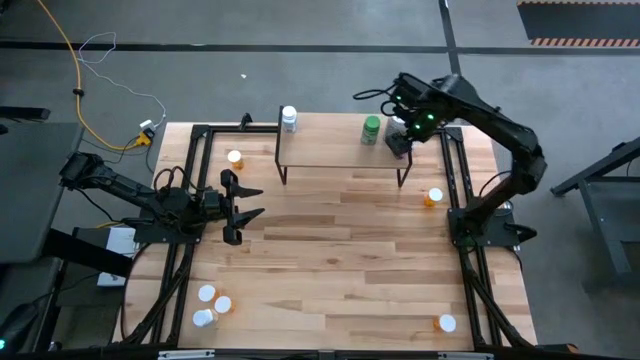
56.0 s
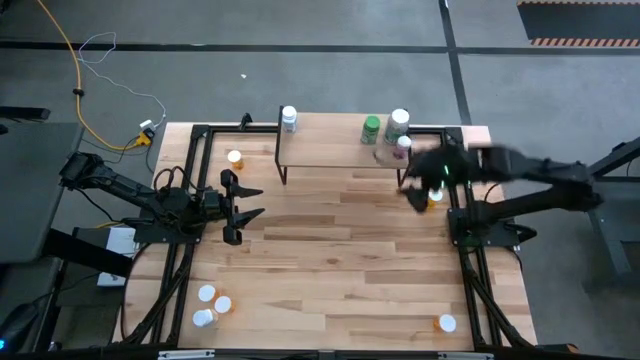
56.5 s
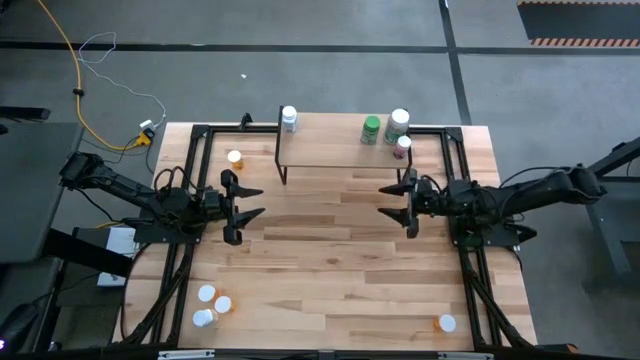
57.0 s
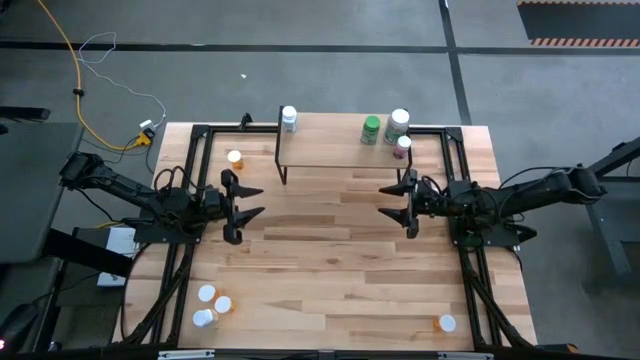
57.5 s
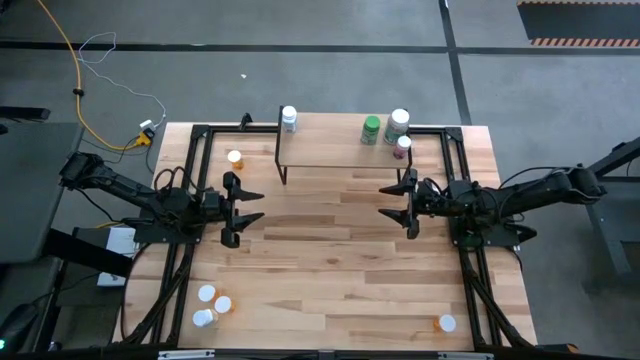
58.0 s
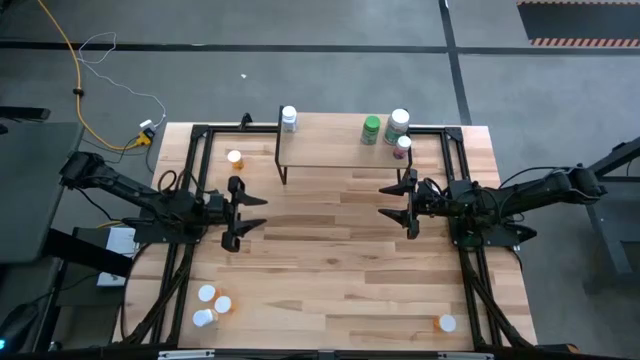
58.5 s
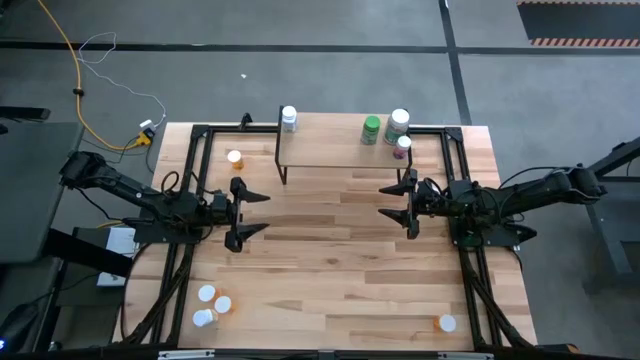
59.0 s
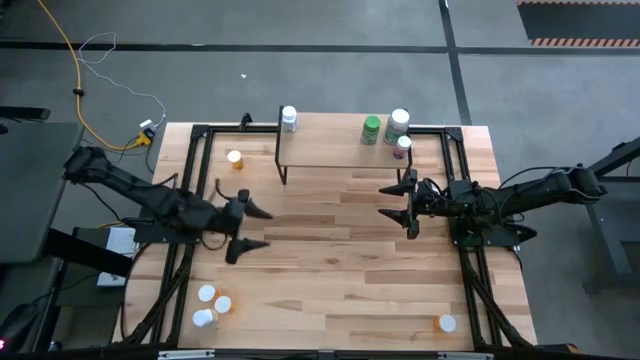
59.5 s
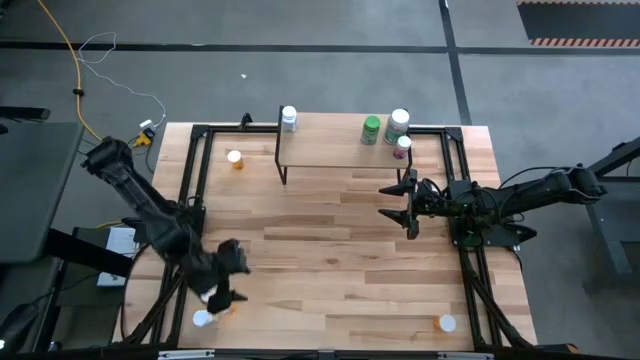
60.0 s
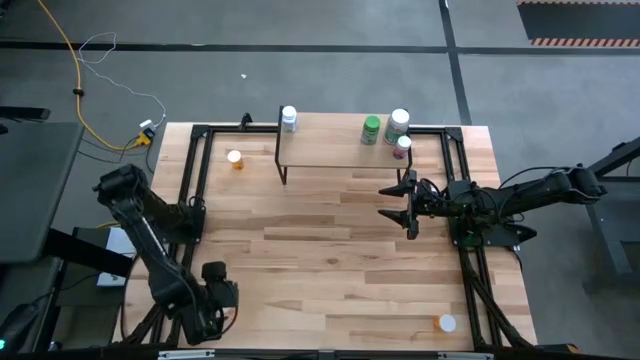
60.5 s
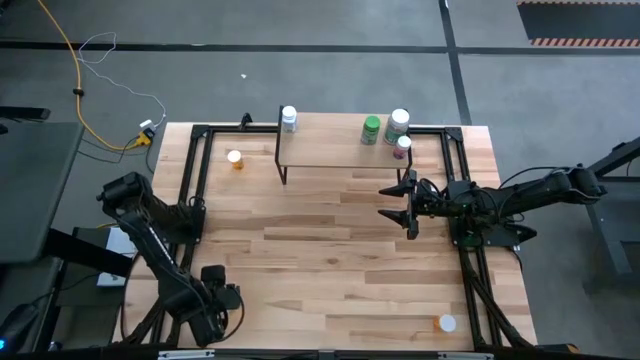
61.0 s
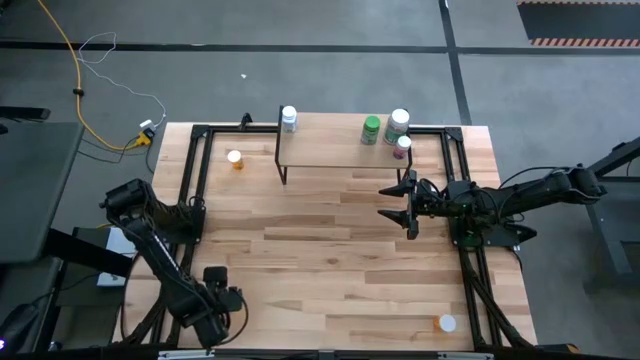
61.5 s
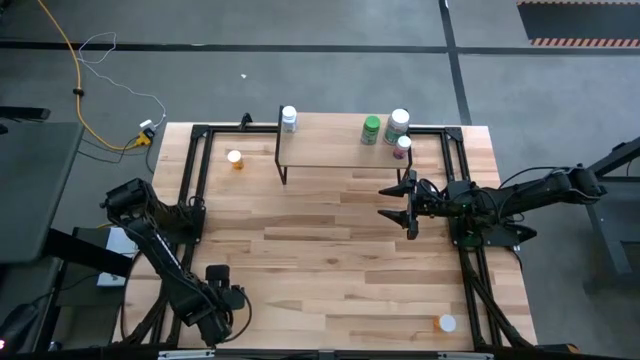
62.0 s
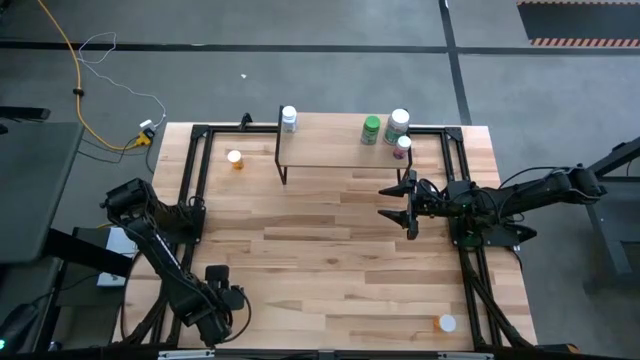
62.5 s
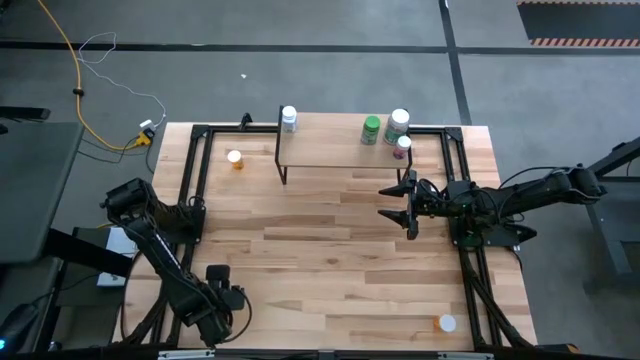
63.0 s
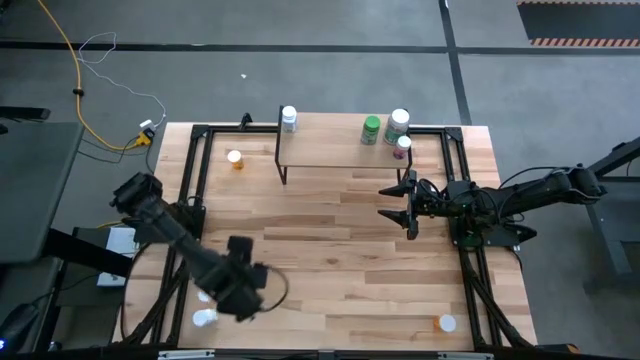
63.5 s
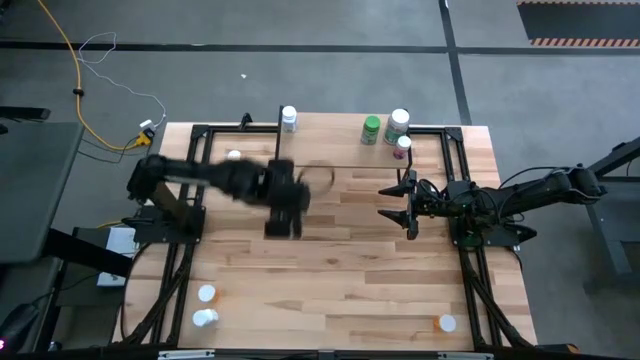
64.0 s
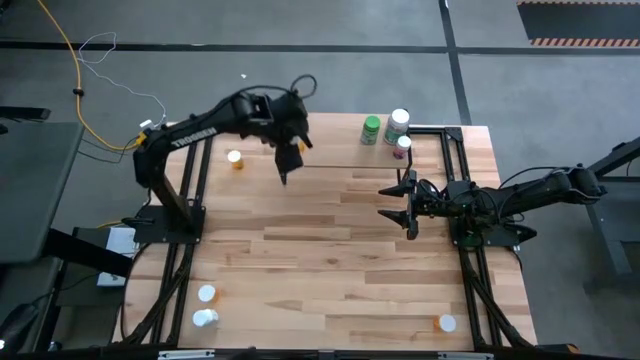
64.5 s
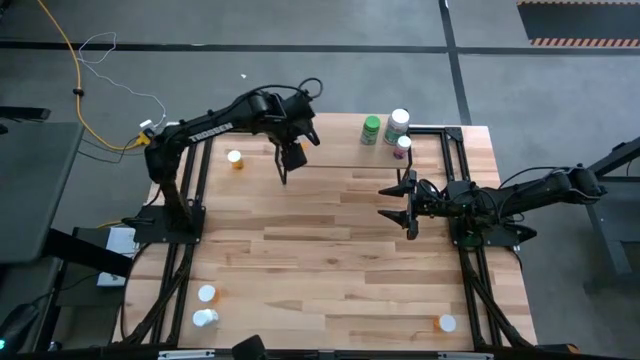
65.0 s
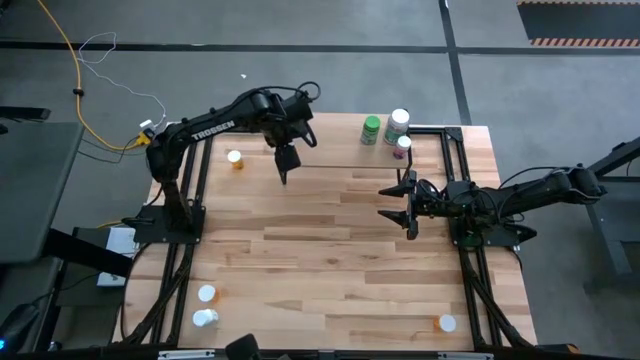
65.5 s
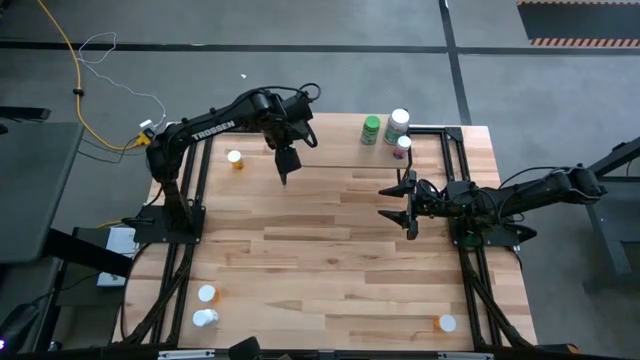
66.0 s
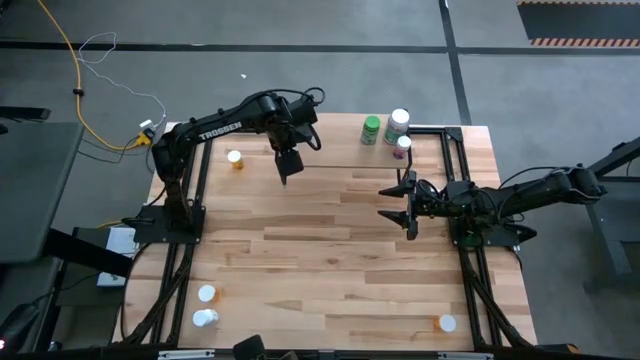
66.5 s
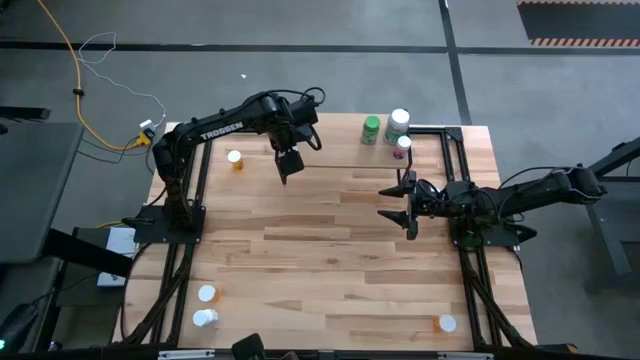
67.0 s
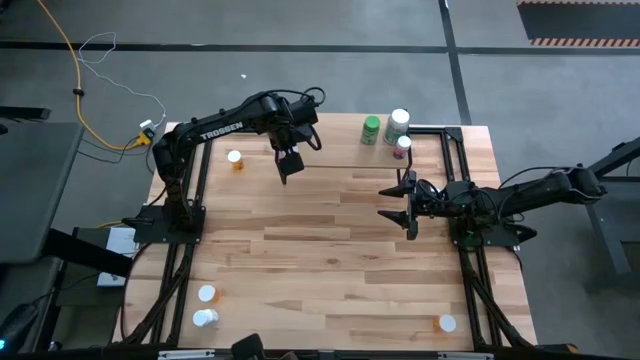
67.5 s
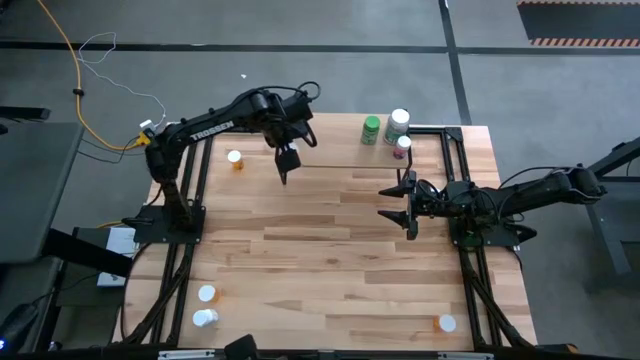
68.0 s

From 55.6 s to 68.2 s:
Task: Pick and place medicine bottles onto shelf by color
Put the orange pill bottle on the shelf

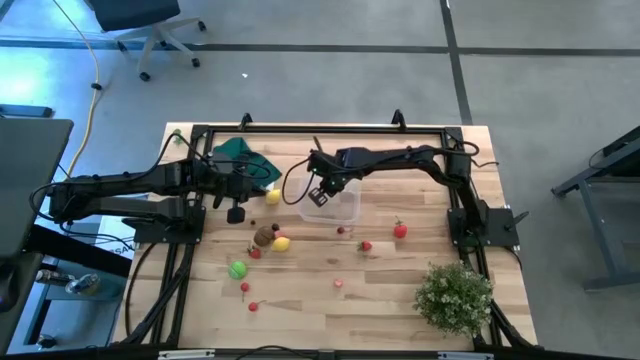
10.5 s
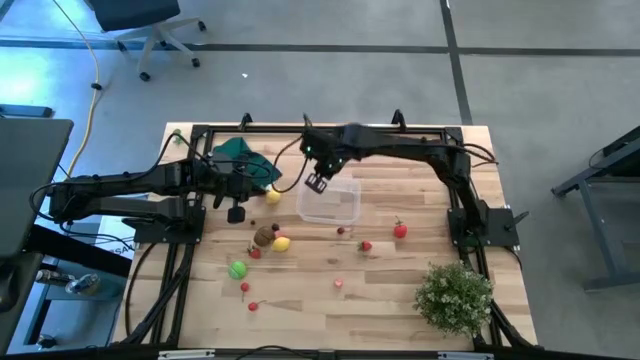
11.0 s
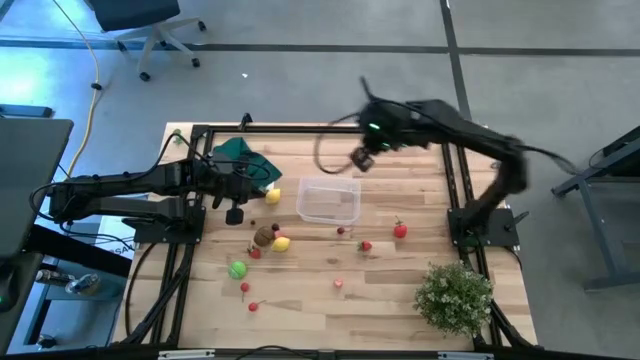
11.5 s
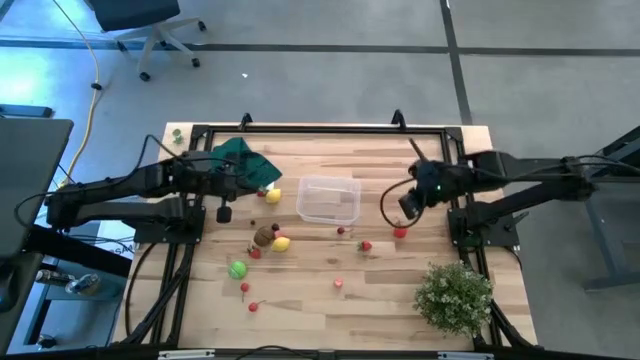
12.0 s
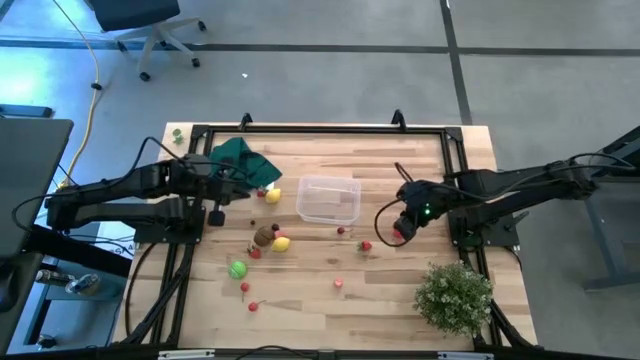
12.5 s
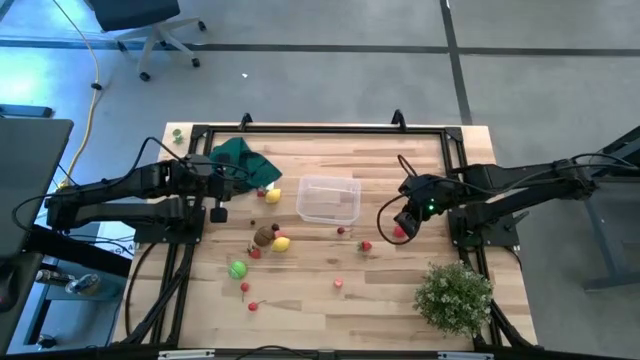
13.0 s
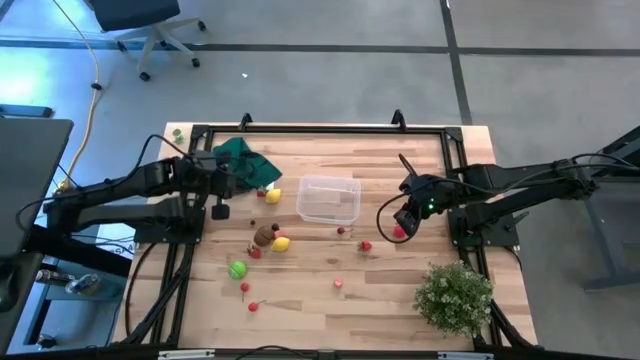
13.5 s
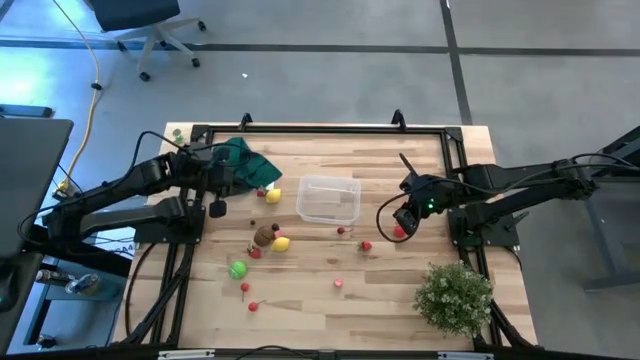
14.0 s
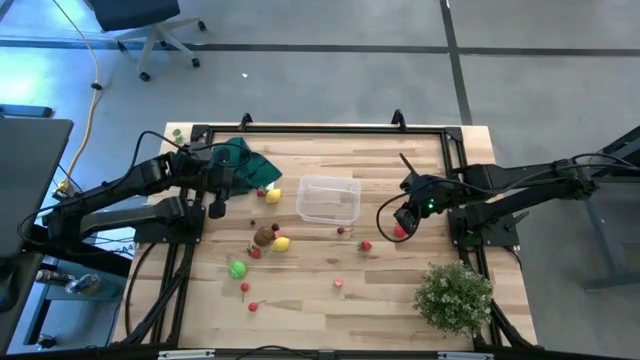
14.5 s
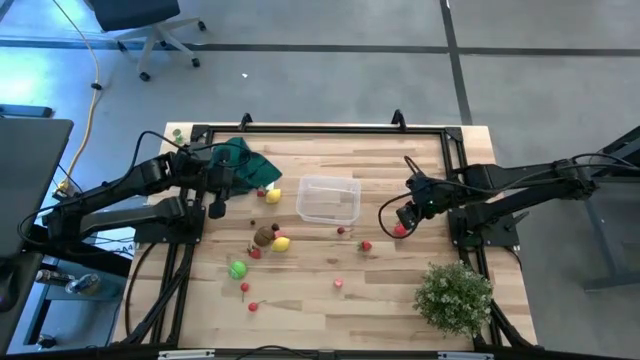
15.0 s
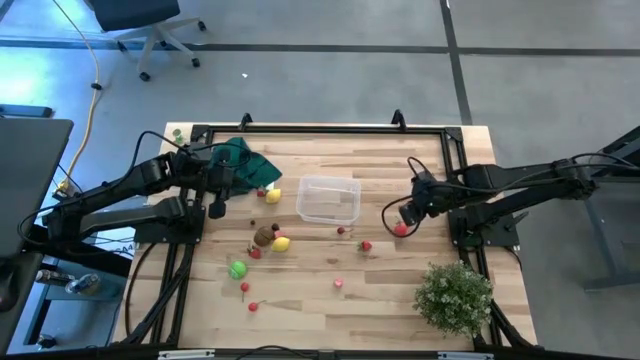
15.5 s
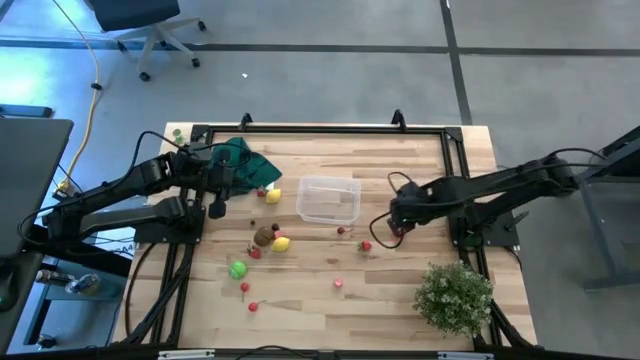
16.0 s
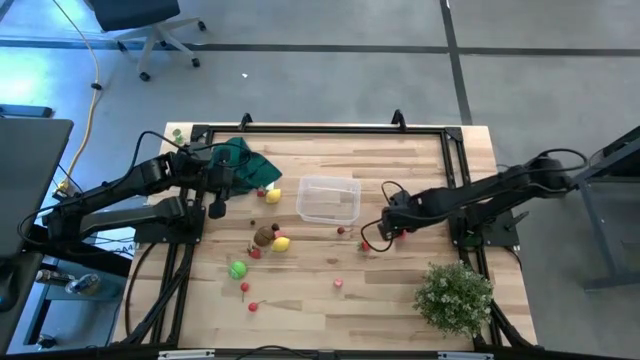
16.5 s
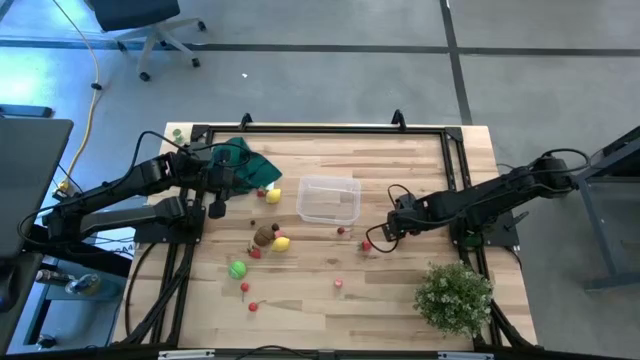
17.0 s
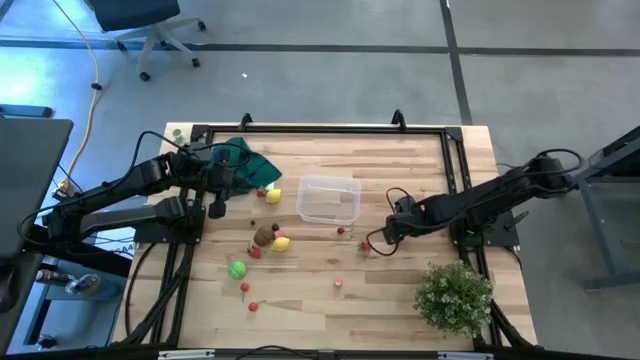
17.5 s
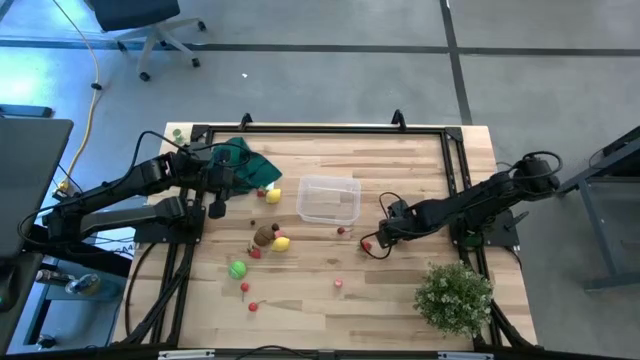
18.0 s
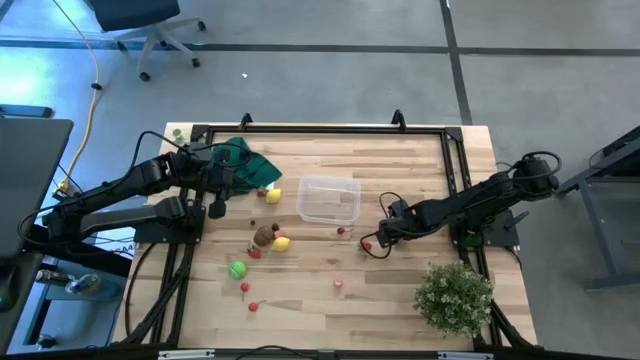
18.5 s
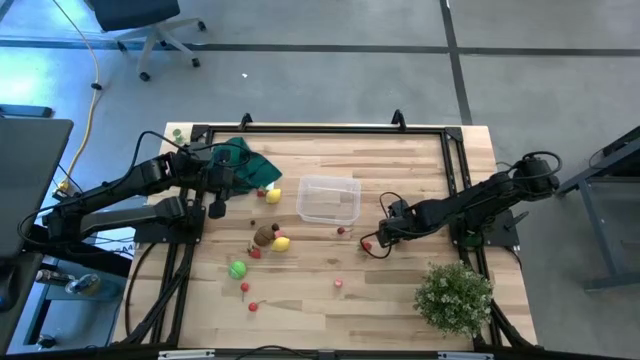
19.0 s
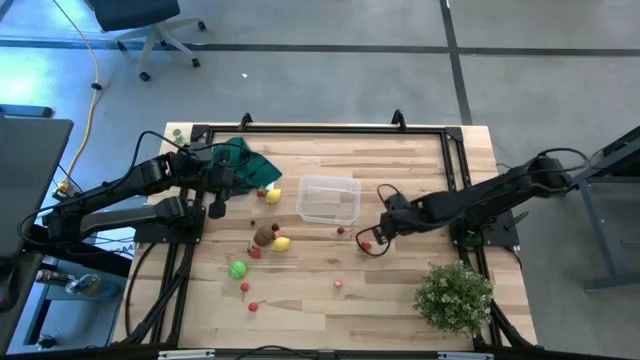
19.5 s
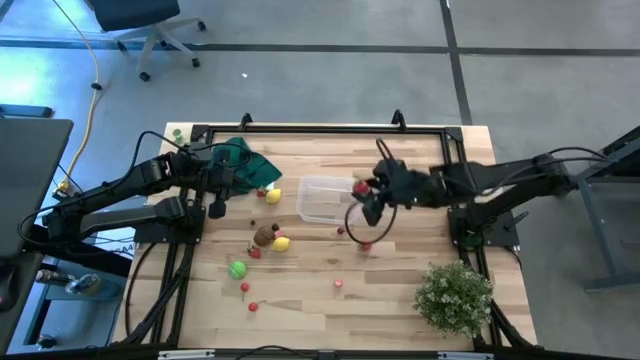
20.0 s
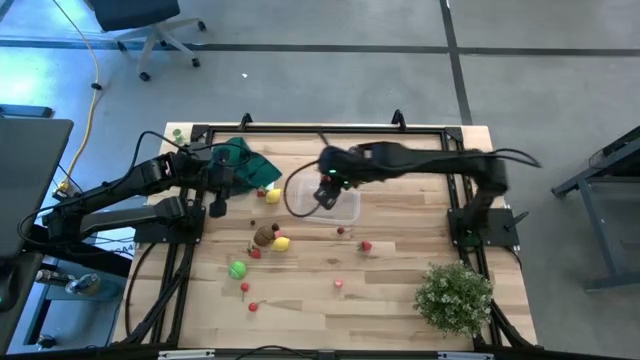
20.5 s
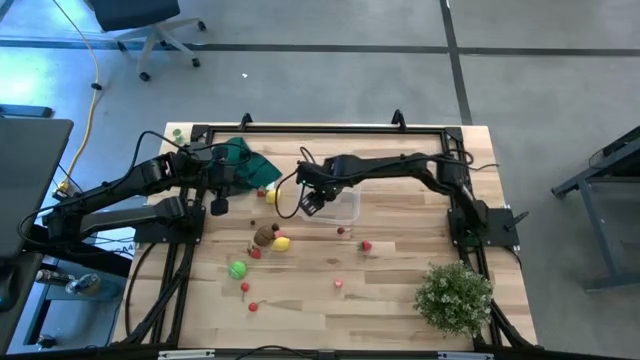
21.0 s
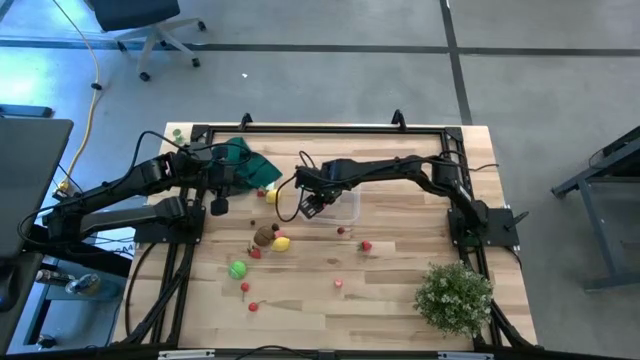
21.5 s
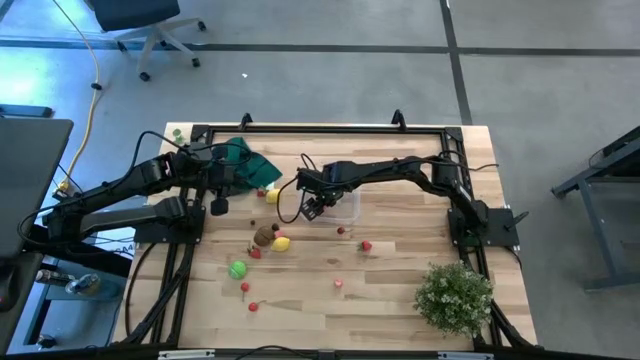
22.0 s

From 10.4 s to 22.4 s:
Task: Pick and placing Produce into tupperware
Put the red strawberry into the transparent bin
